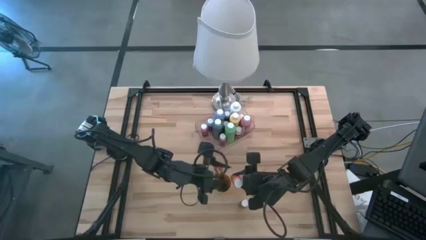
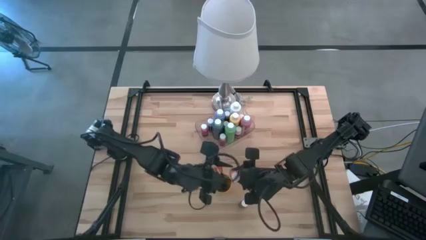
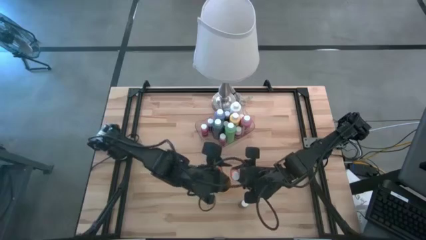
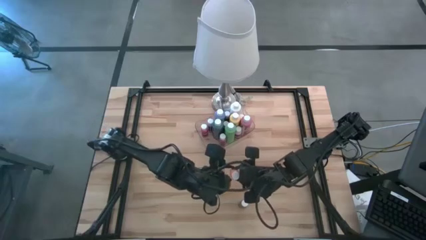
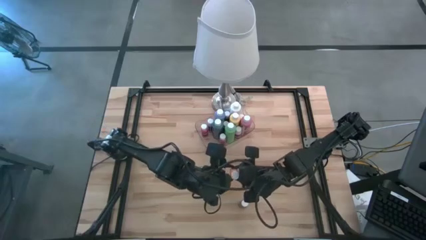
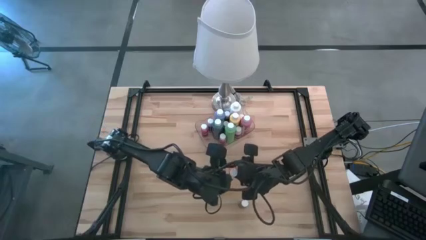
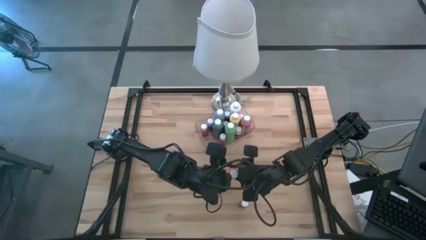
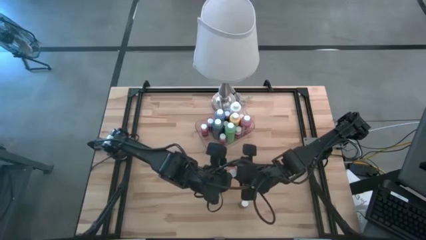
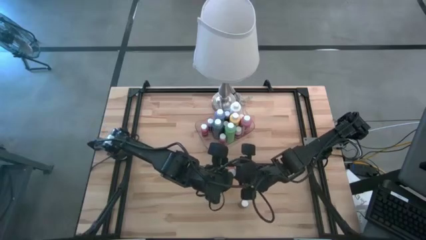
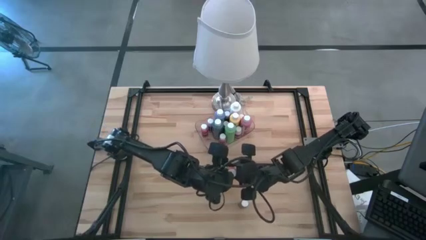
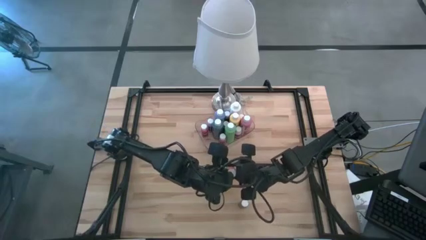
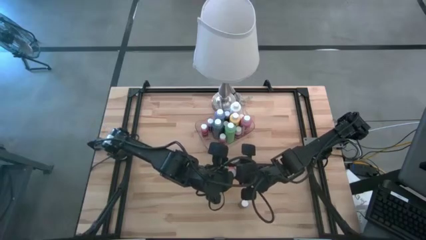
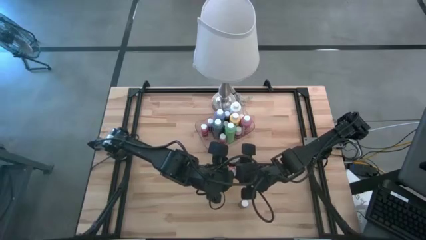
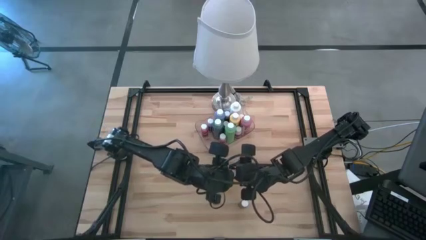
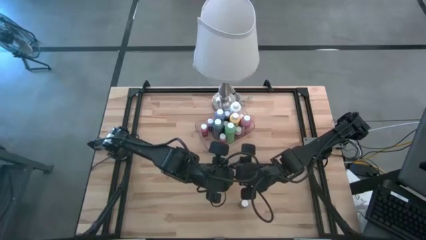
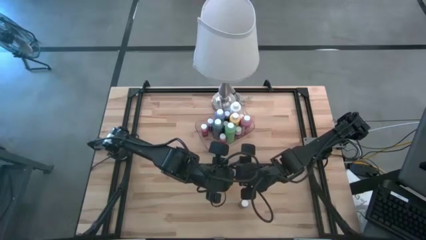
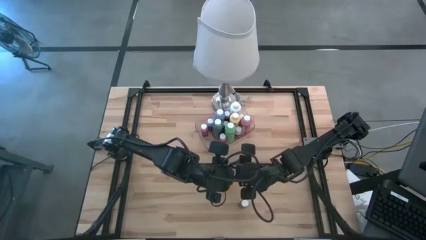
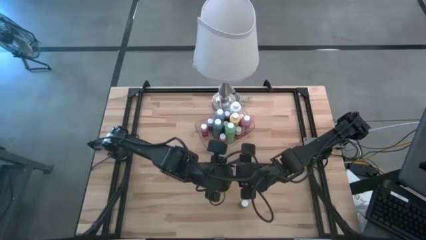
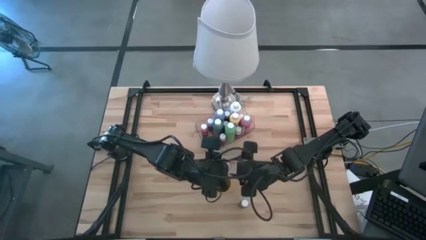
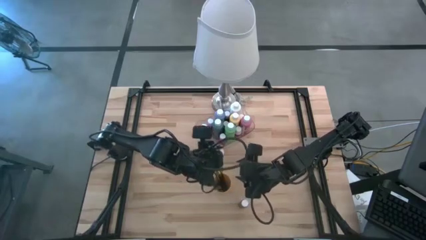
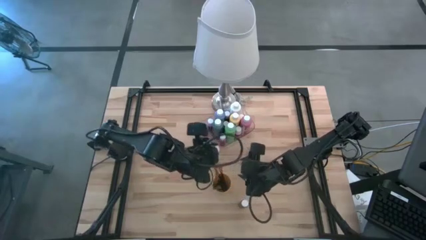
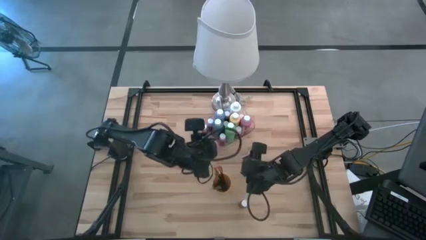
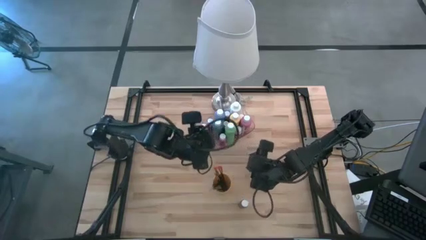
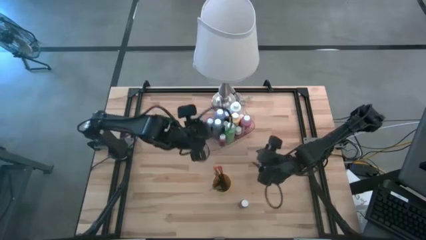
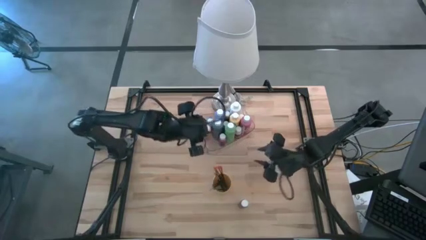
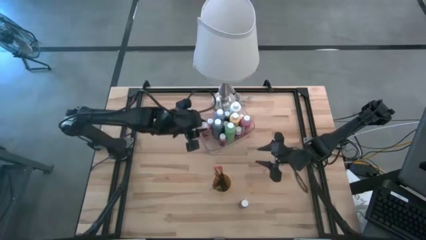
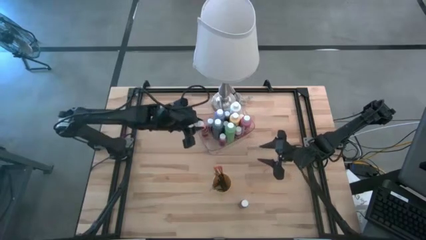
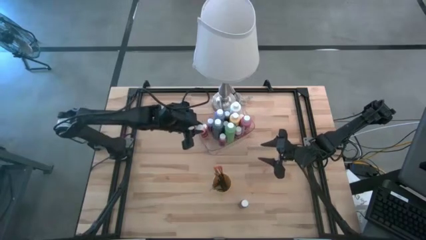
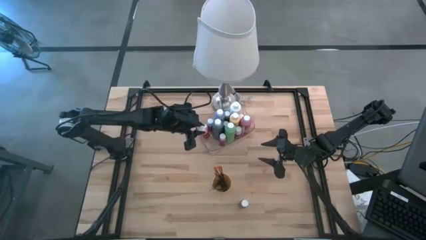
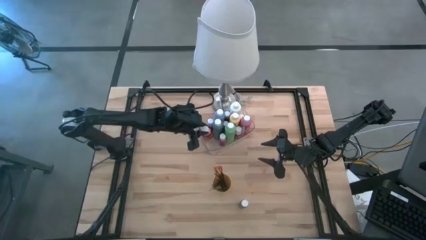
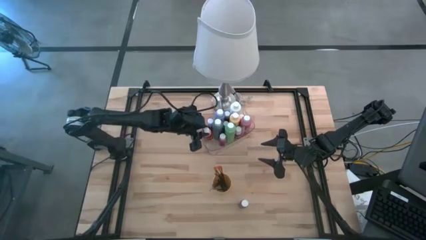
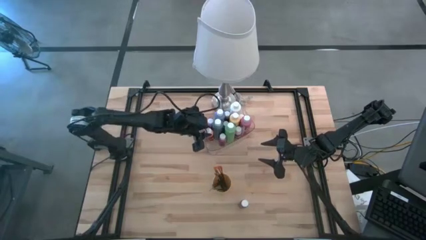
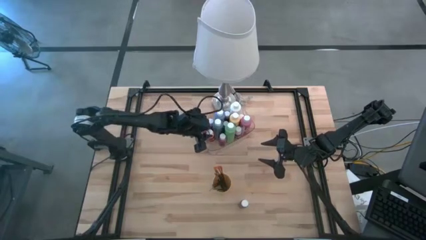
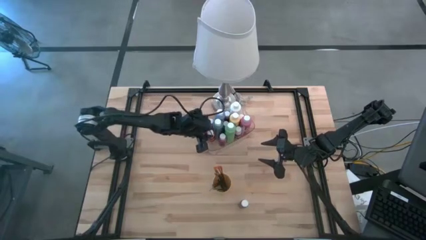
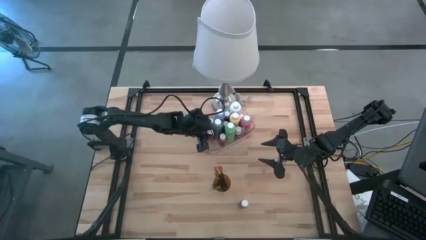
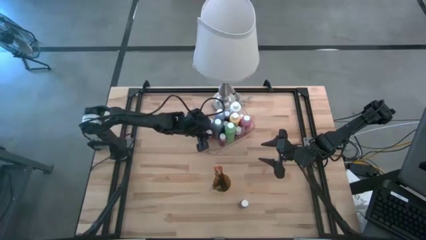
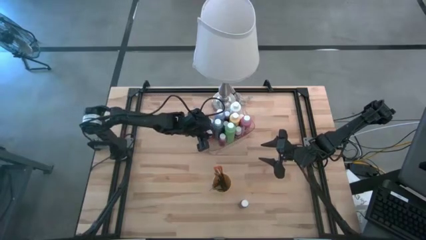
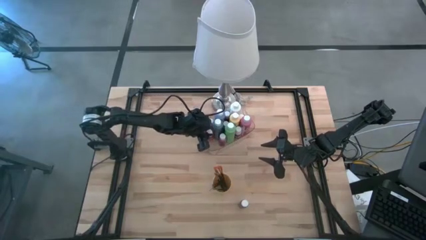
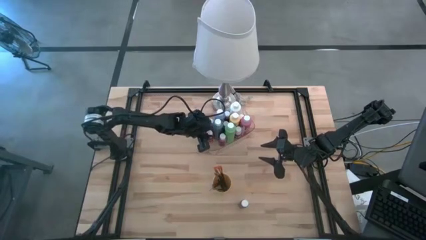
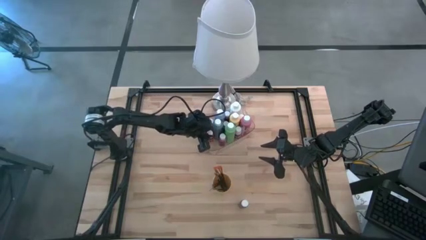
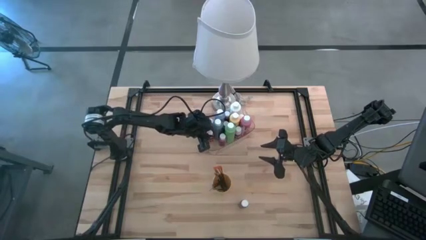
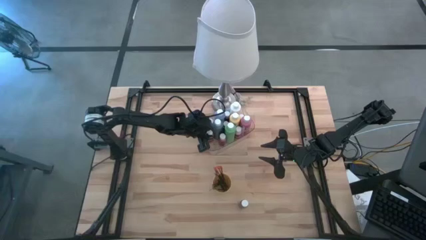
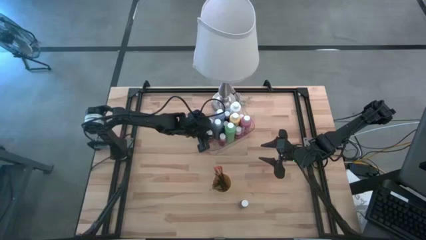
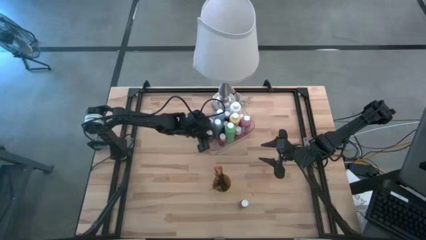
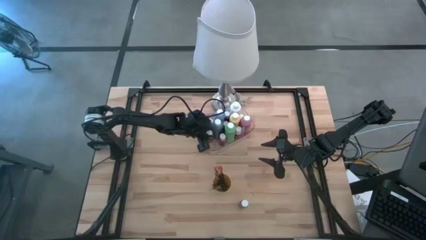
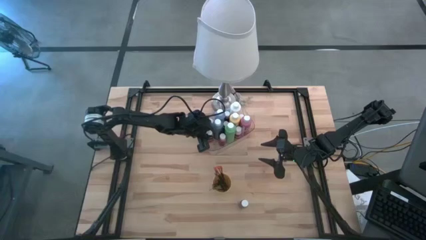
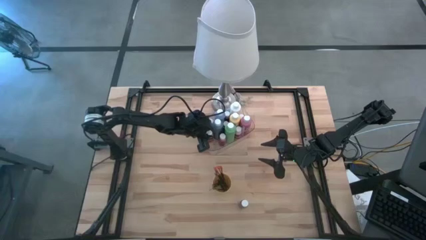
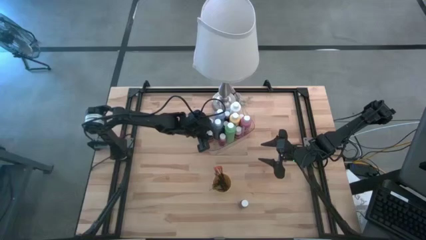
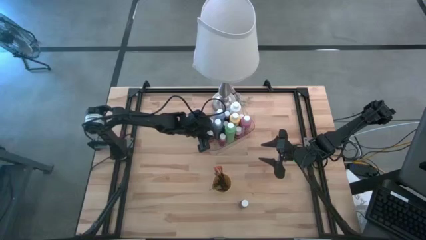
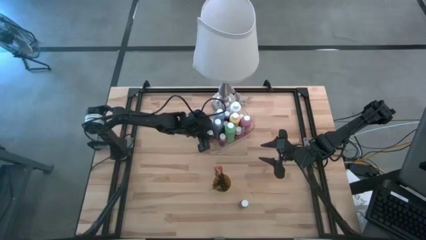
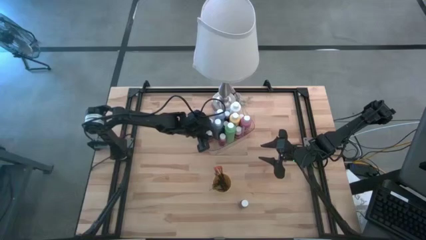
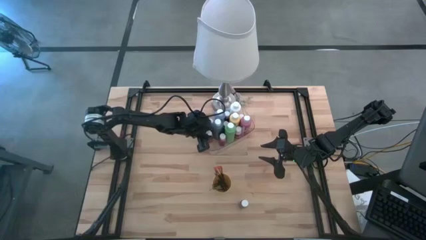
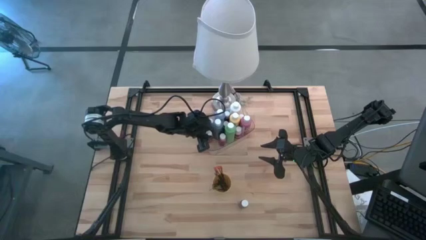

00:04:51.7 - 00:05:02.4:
Task: Pick & Place Paint Supplies
Put the orange bottle into the transparent bin
